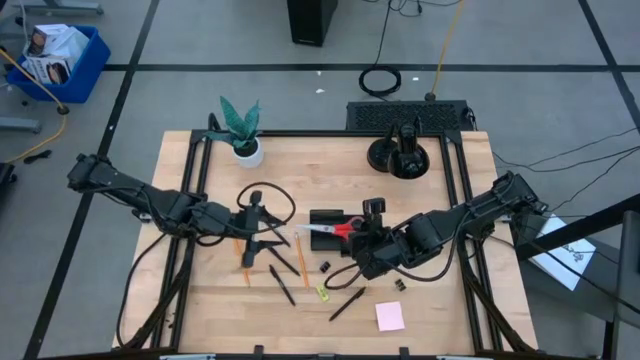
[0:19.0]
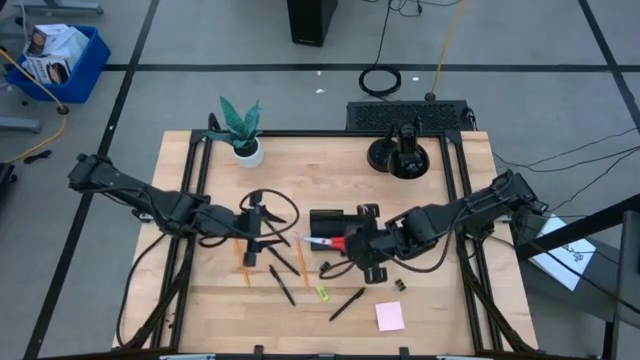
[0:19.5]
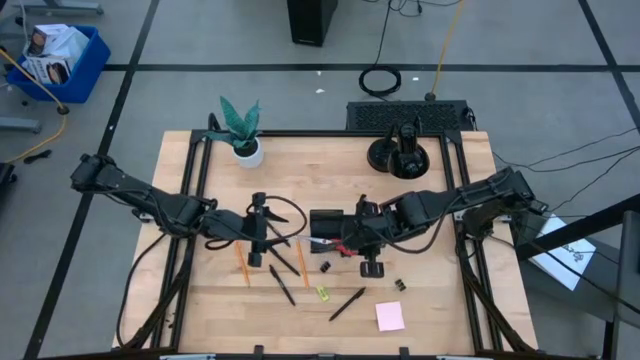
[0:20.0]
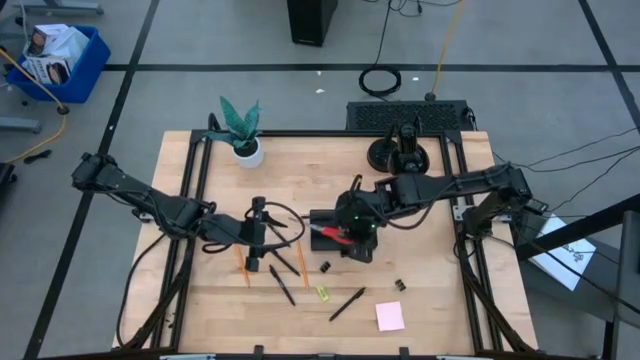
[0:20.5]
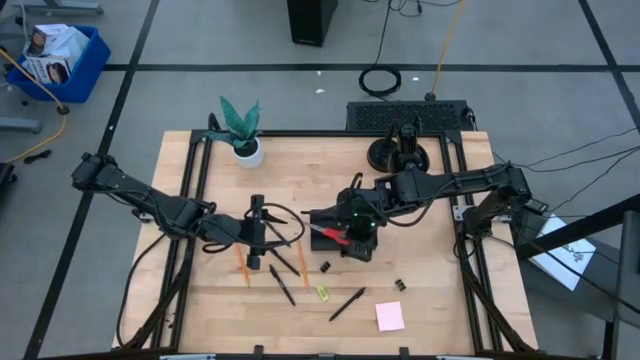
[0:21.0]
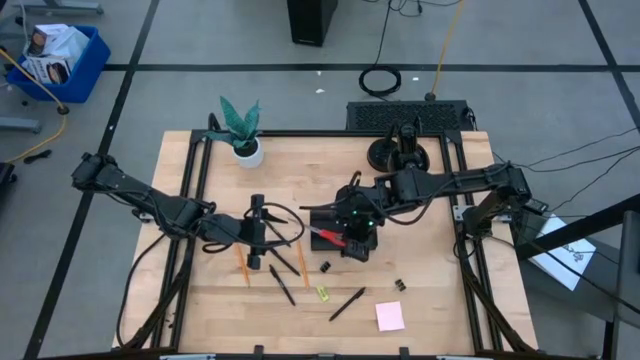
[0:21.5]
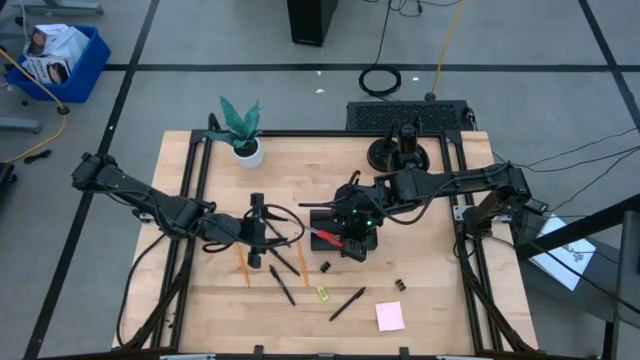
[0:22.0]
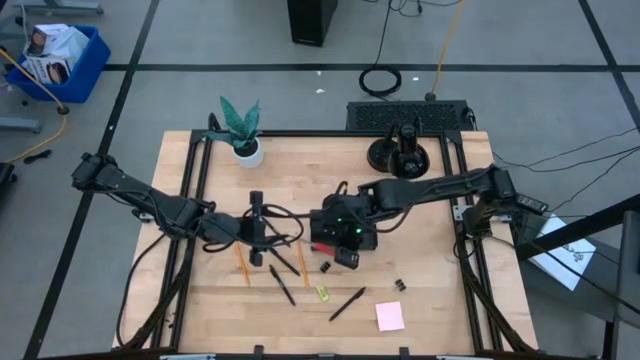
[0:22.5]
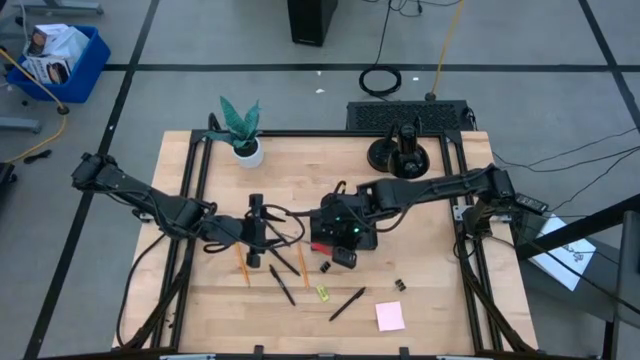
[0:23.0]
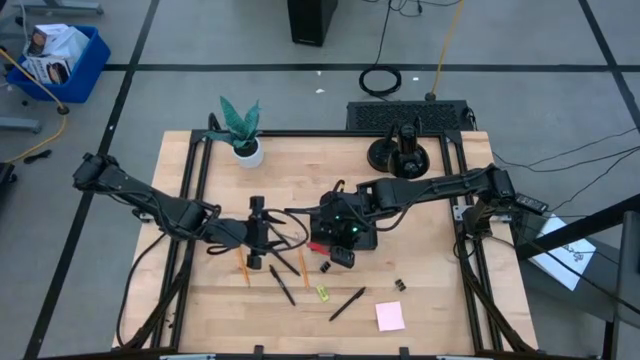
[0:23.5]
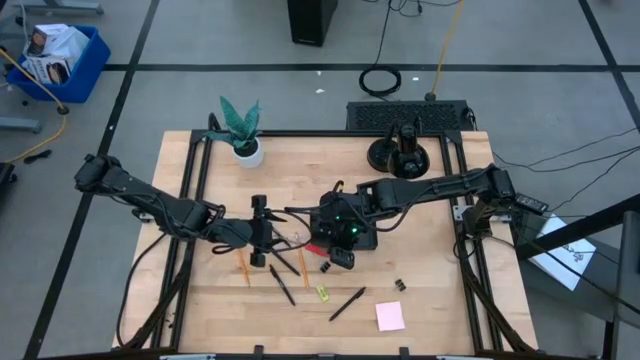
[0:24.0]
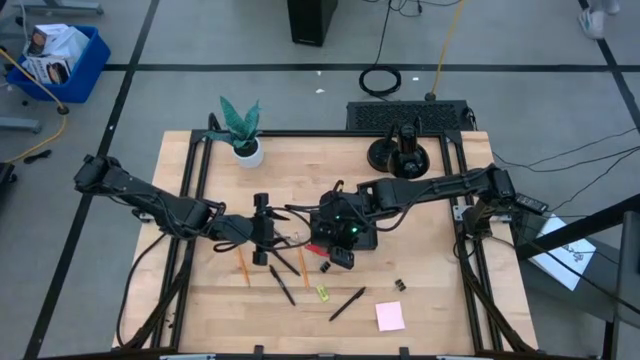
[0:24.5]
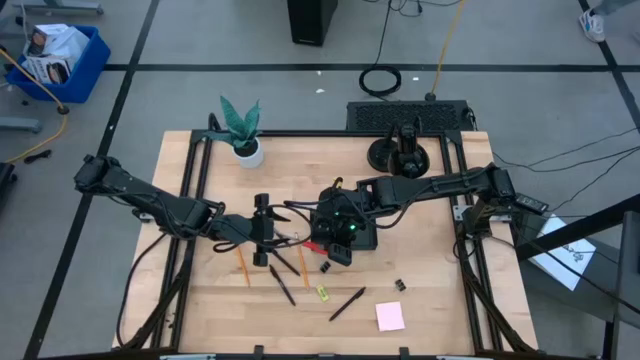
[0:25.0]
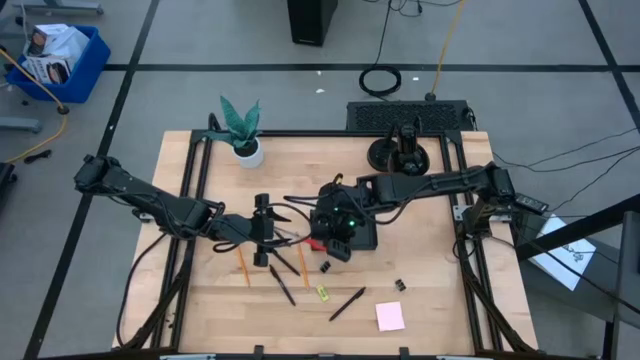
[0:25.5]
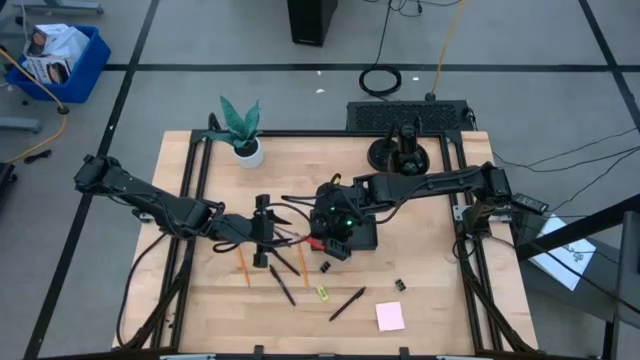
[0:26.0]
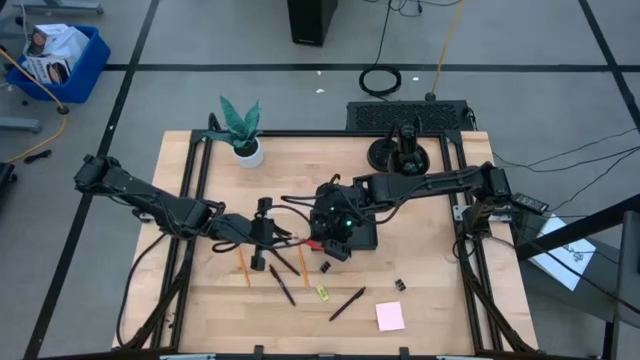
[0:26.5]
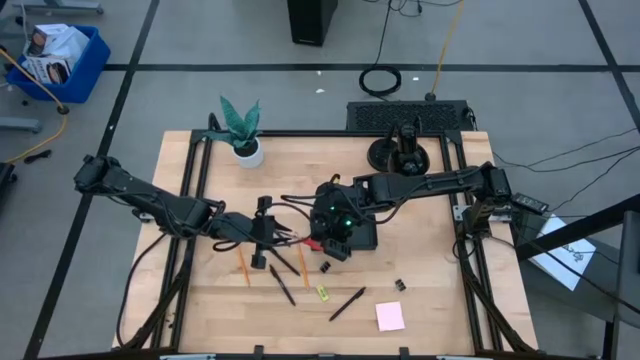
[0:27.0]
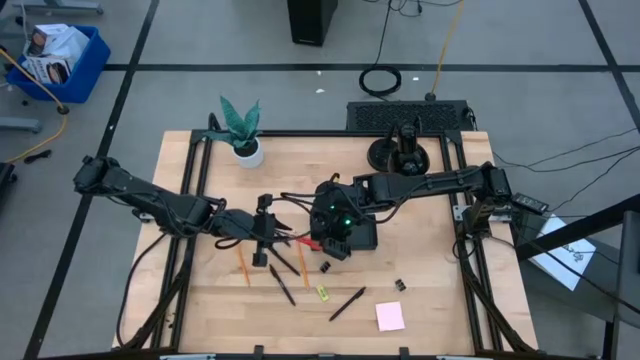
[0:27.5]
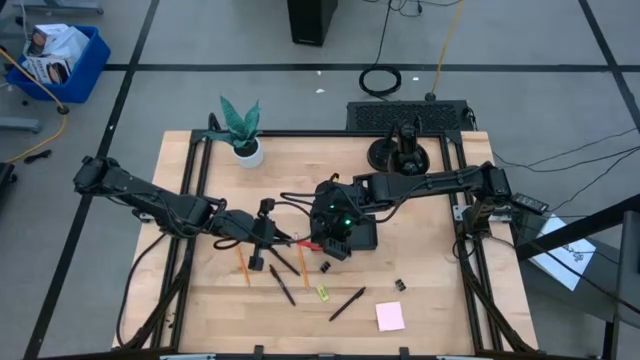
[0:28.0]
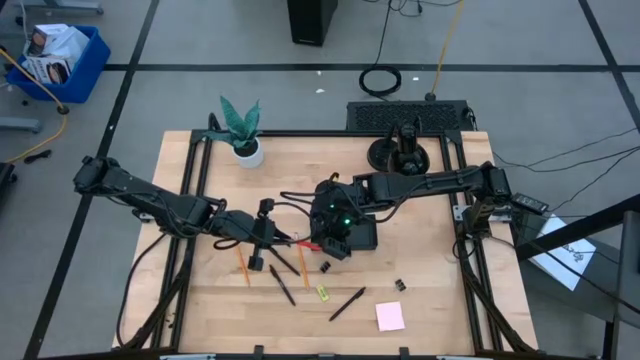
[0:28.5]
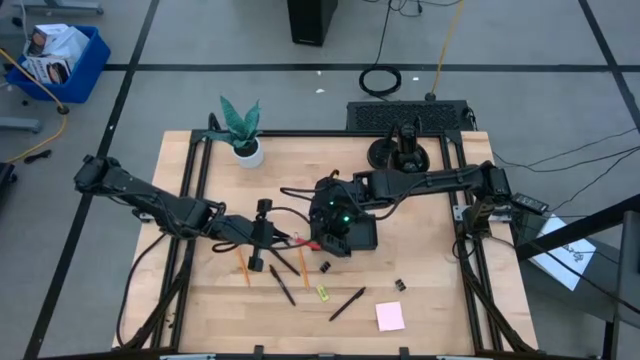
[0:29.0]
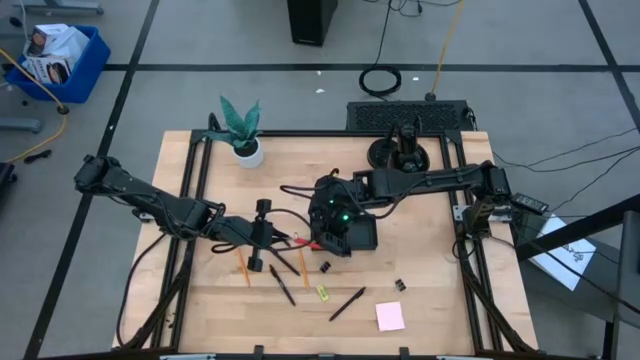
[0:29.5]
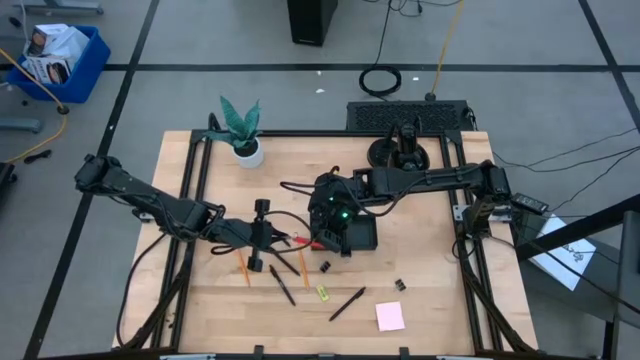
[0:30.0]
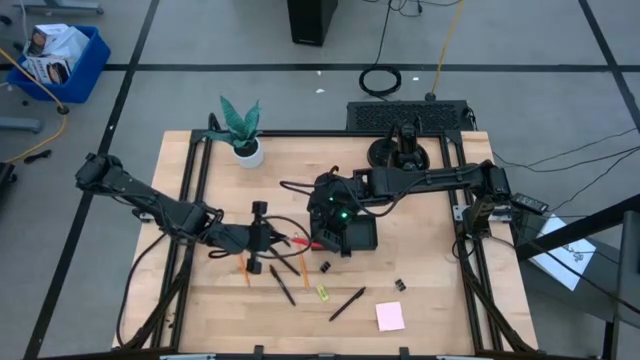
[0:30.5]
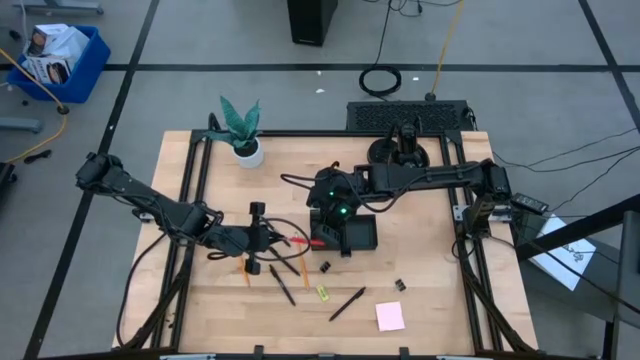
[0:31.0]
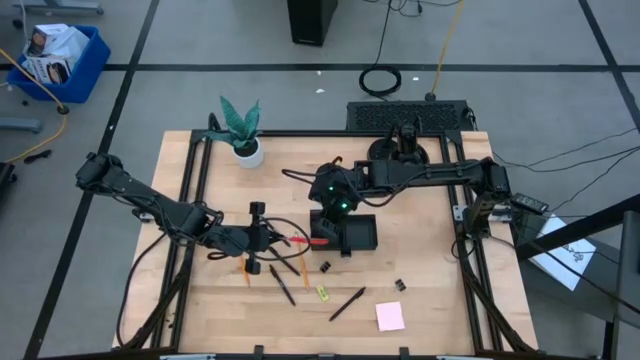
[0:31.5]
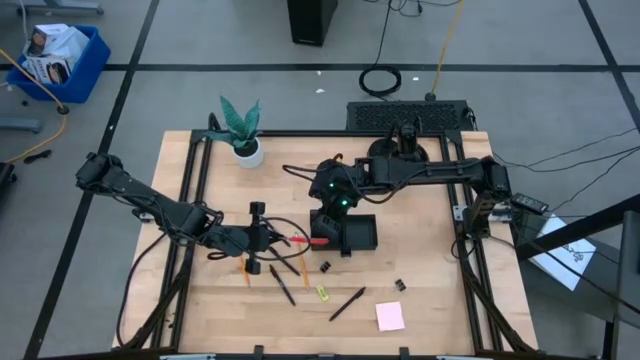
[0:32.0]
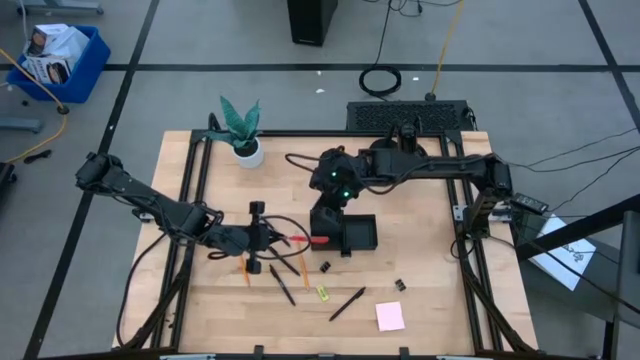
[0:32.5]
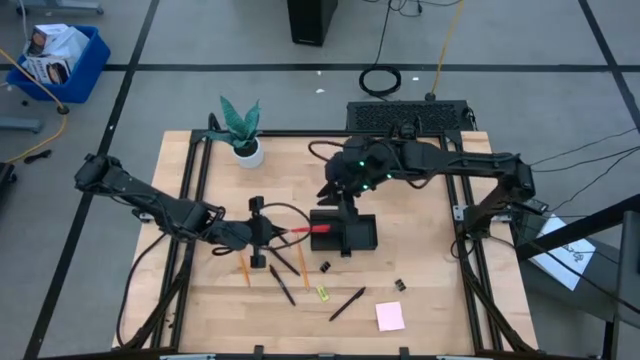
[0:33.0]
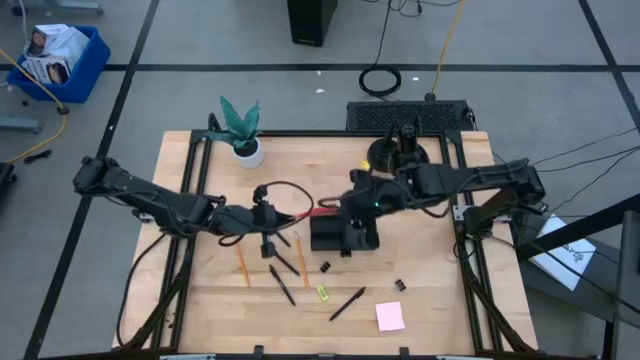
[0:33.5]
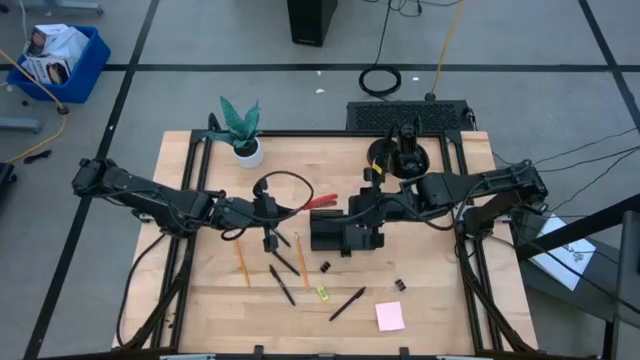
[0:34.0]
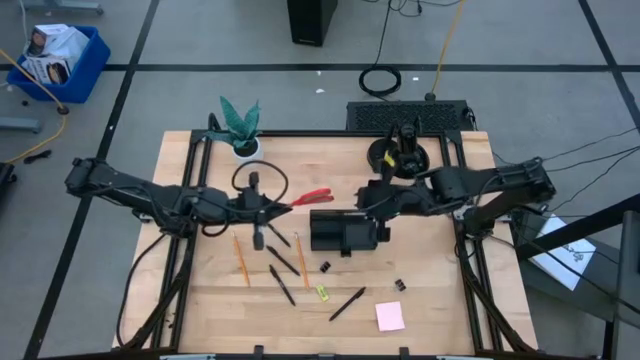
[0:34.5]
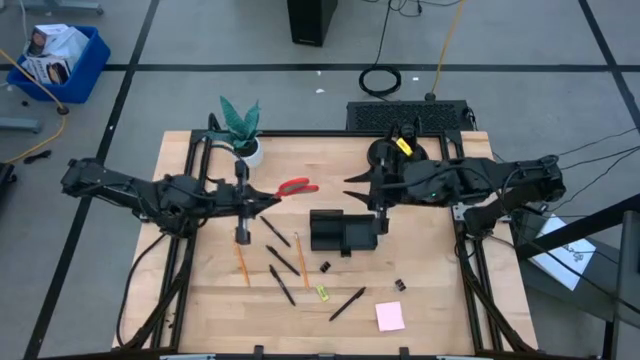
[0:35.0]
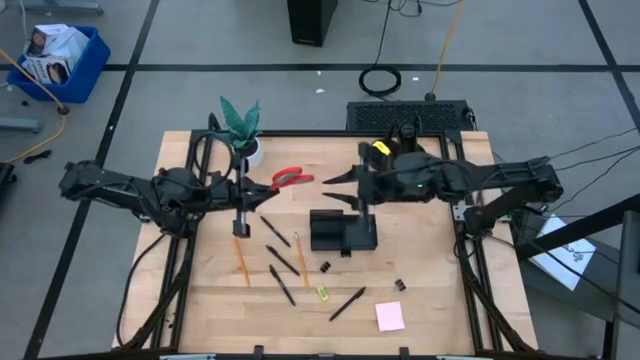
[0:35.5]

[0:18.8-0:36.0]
Task: Pick and place office supplies into organizer
Put the orange scissors into the black desk organizer

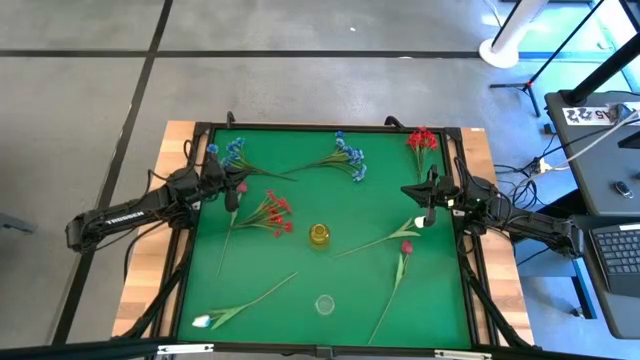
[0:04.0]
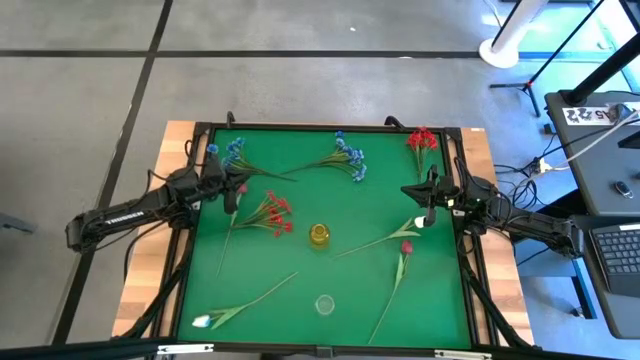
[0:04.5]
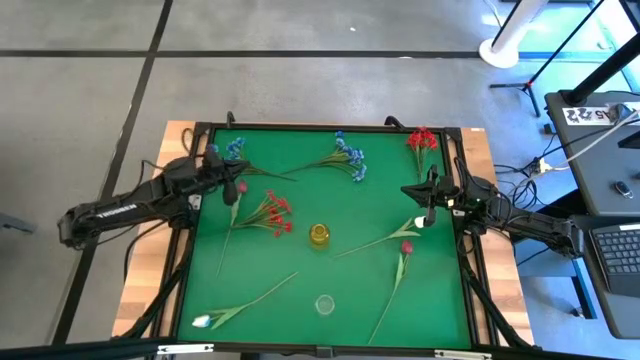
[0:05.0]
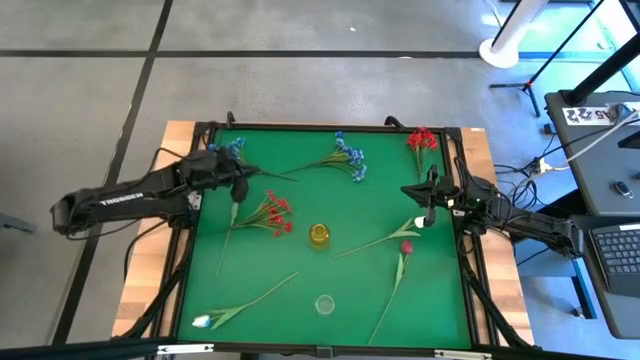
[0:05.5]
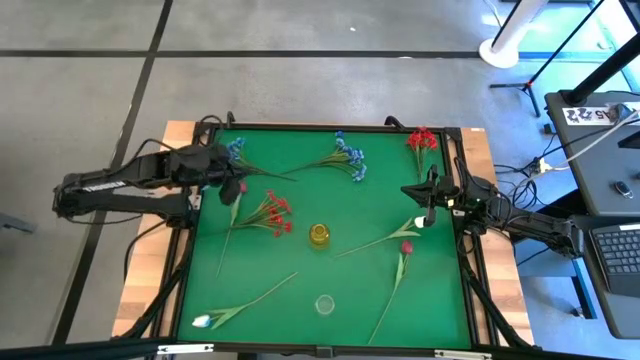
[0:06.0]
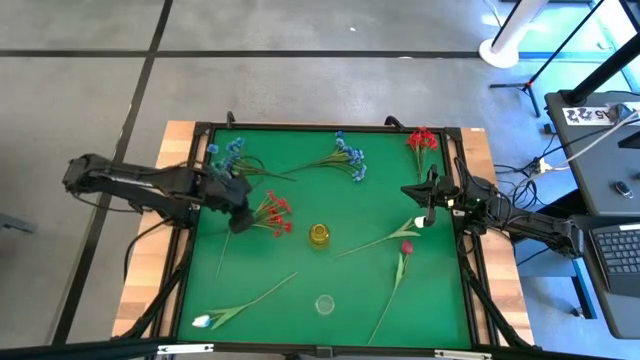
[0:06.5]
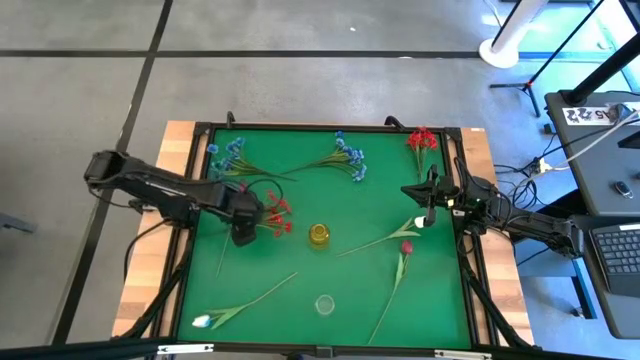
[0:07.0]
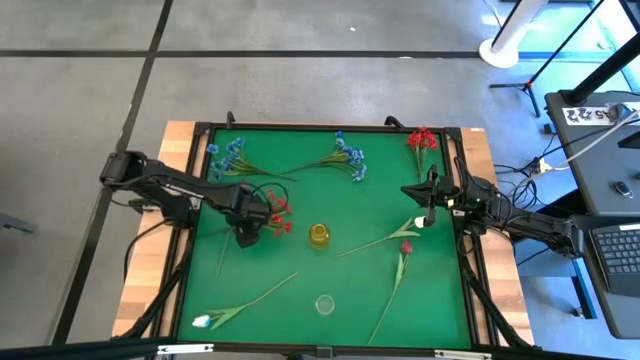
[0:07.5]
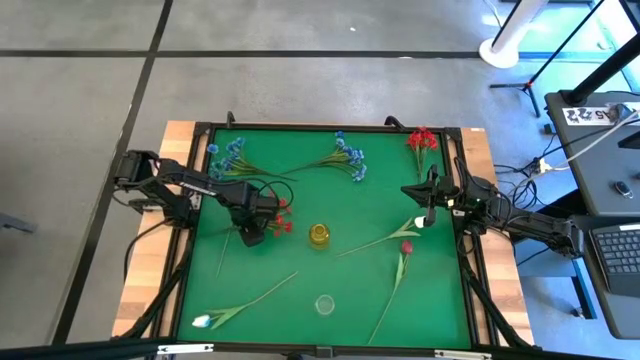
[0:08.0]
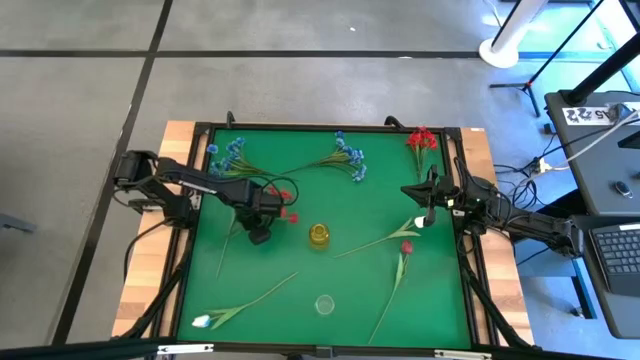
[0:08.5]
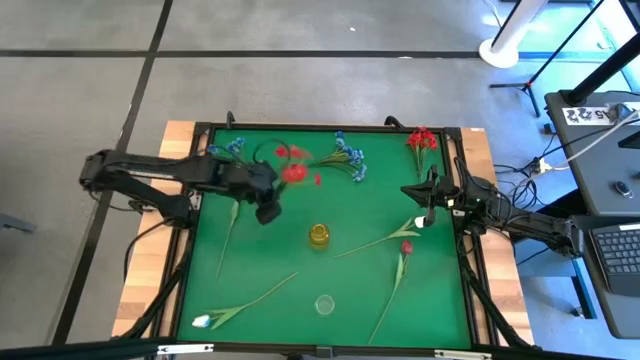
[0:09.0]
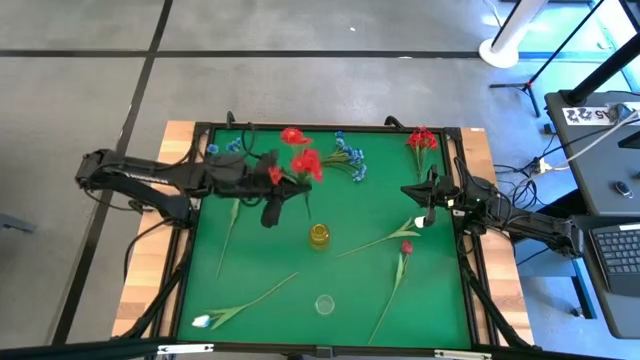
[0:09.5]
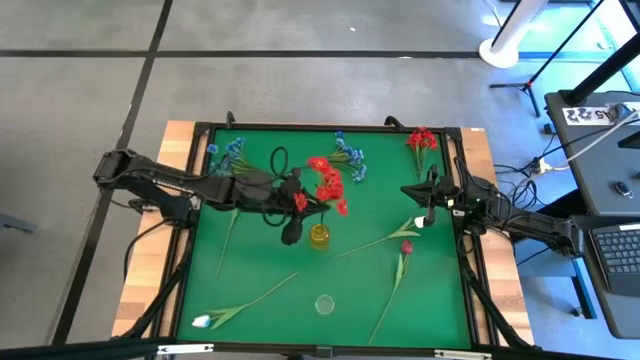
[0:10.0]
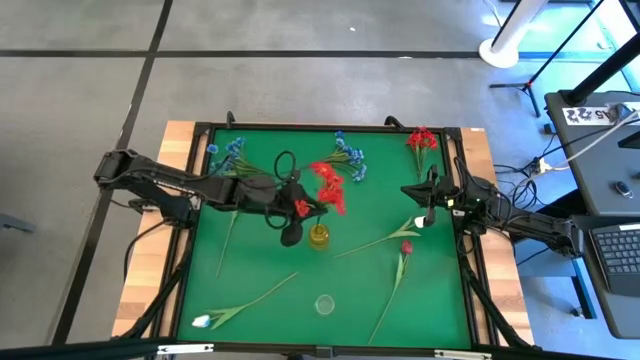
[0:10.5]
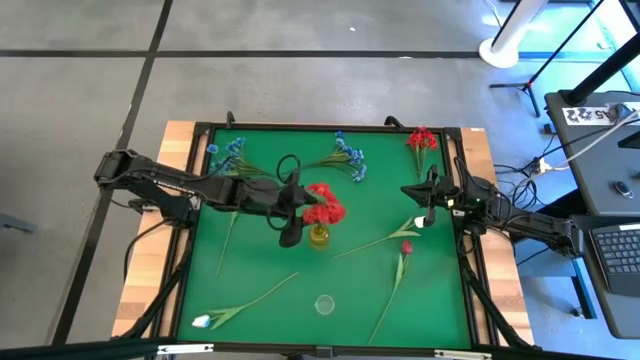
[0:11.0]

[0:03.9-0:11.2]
Task: Sort flowers into vase by color
Put the left red flowers into the yellow vase
